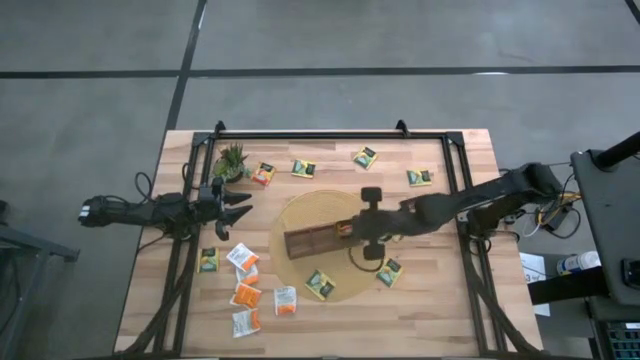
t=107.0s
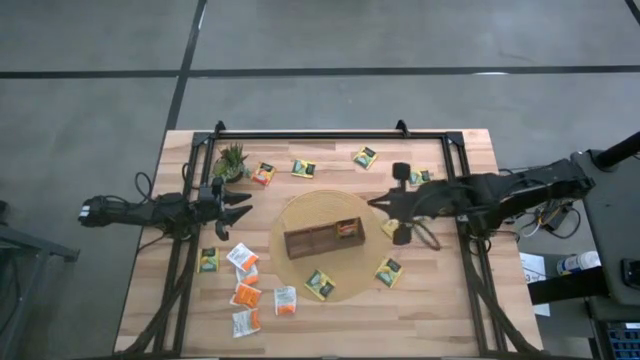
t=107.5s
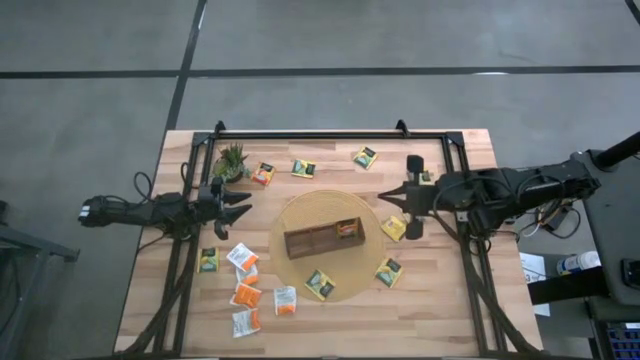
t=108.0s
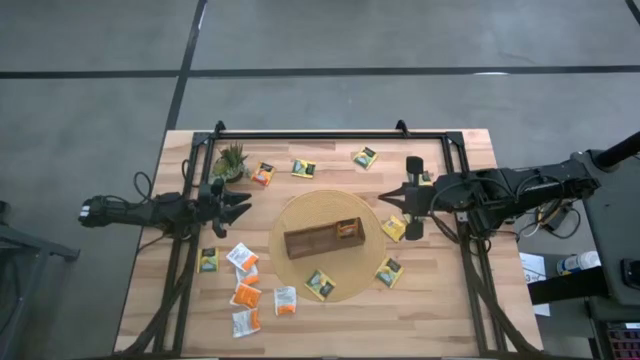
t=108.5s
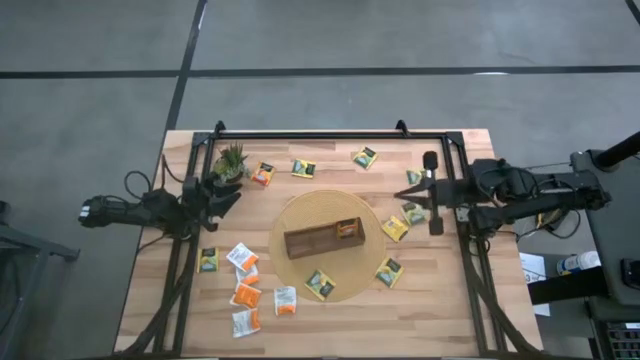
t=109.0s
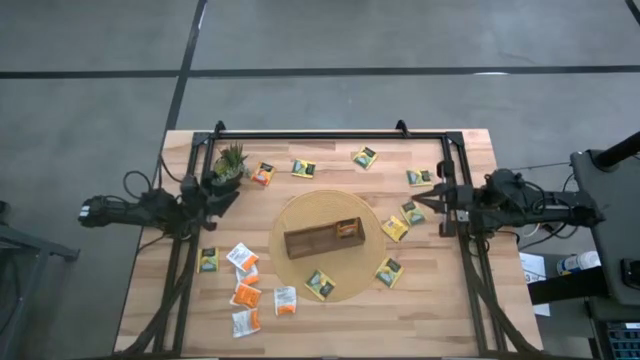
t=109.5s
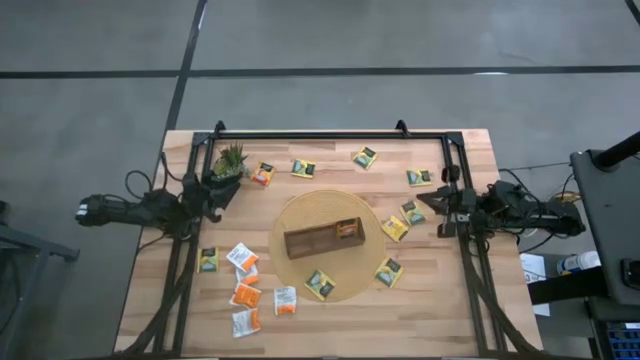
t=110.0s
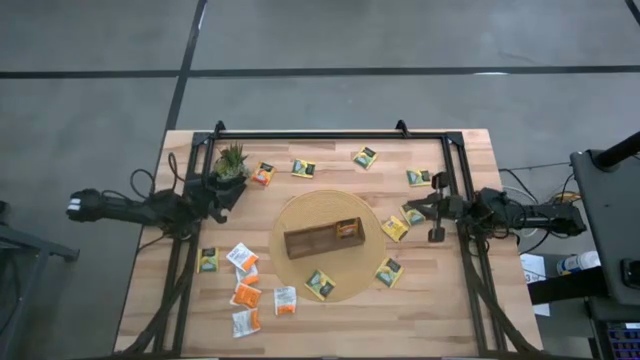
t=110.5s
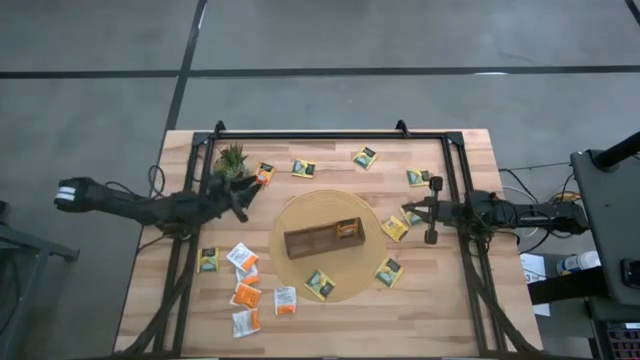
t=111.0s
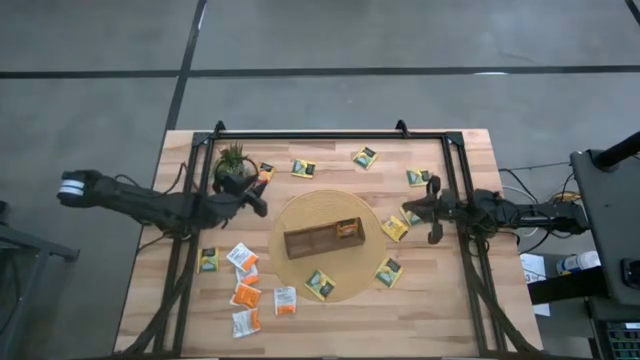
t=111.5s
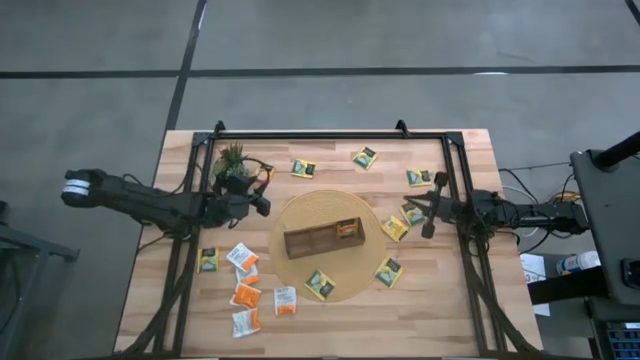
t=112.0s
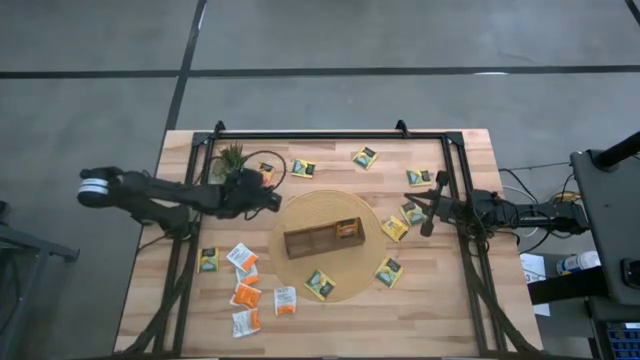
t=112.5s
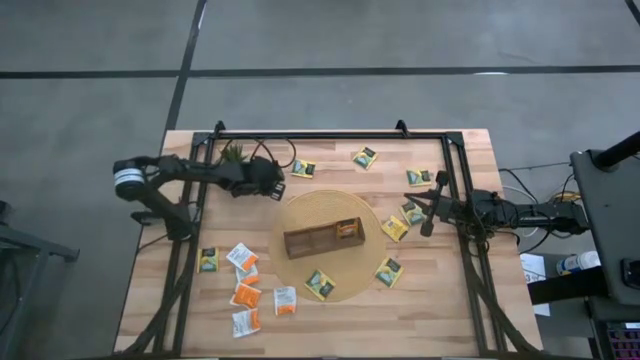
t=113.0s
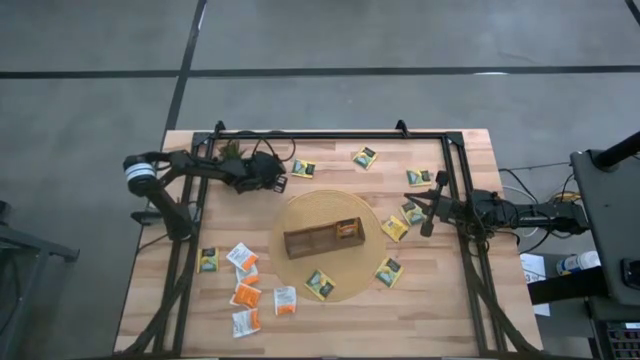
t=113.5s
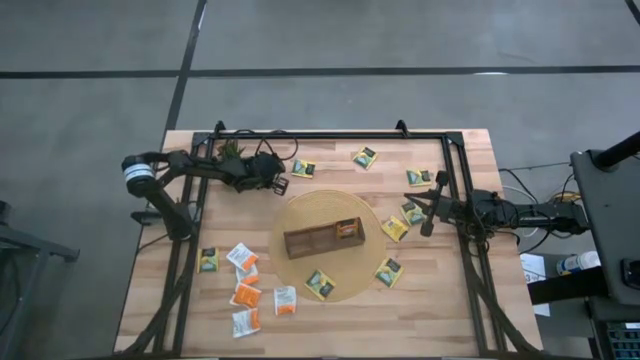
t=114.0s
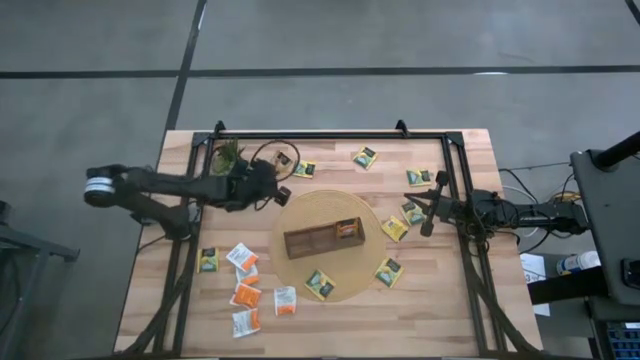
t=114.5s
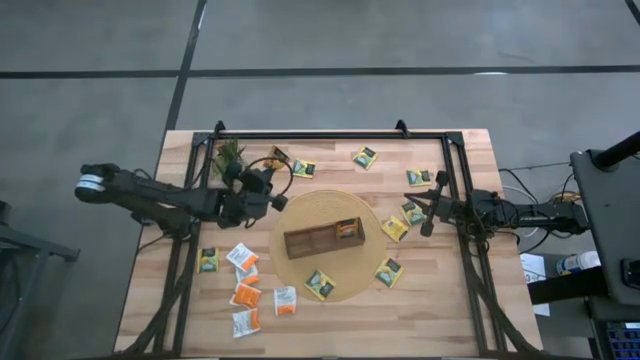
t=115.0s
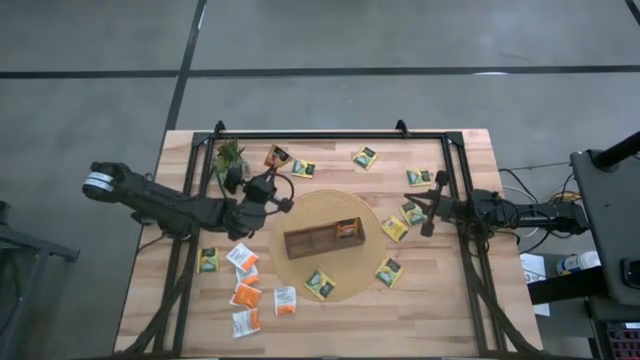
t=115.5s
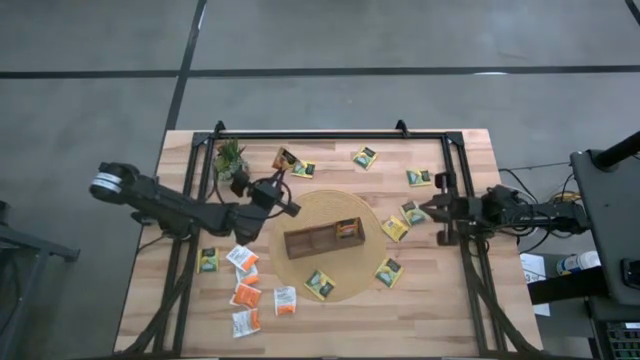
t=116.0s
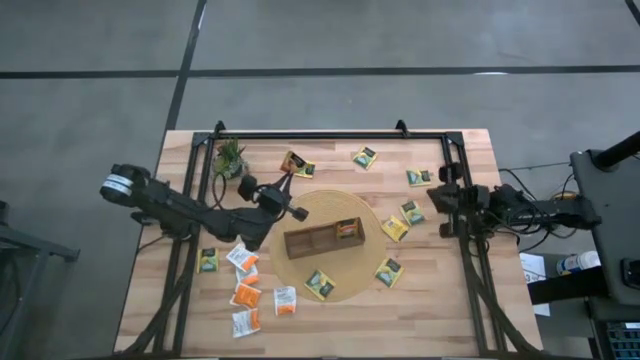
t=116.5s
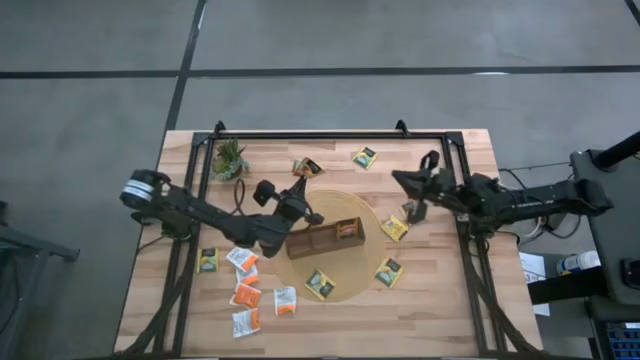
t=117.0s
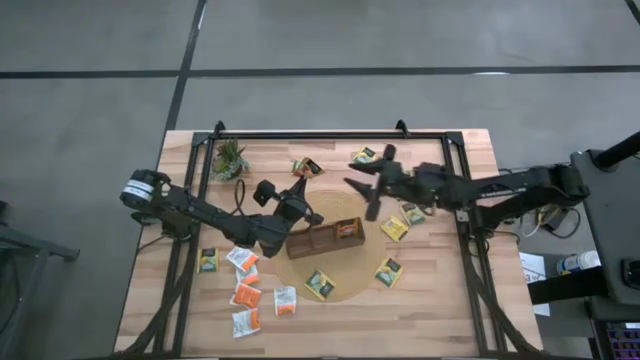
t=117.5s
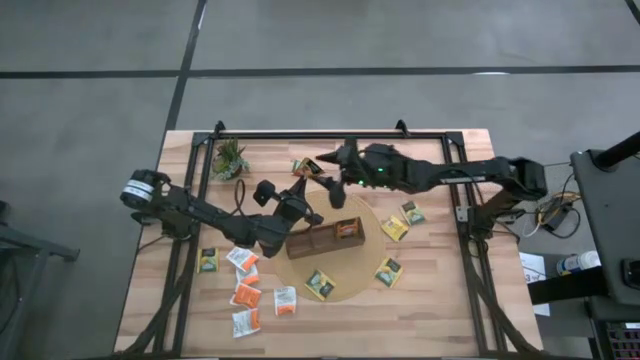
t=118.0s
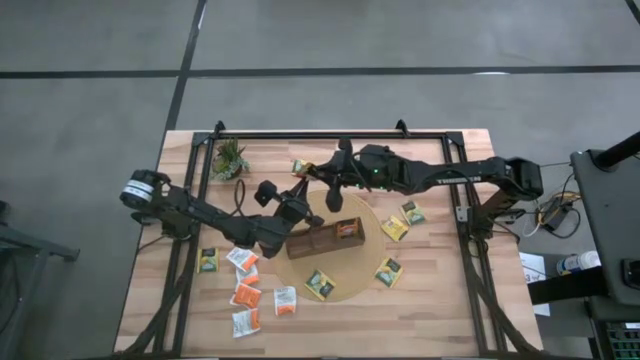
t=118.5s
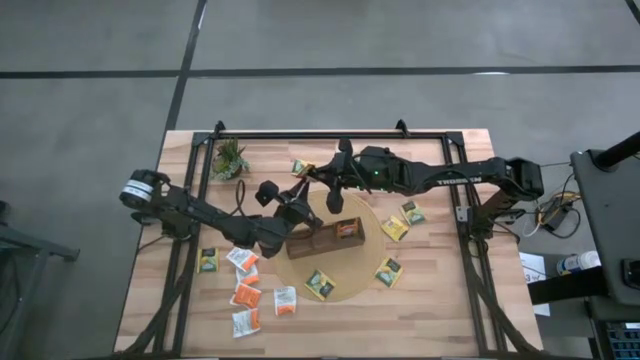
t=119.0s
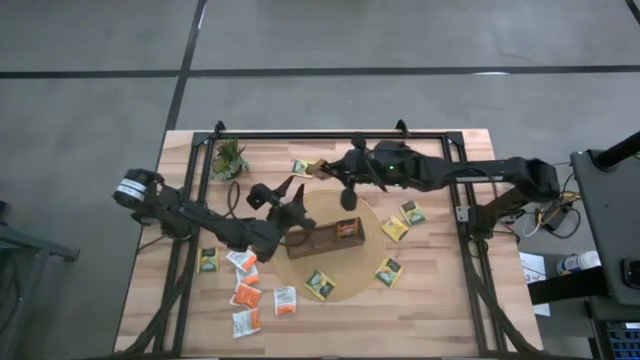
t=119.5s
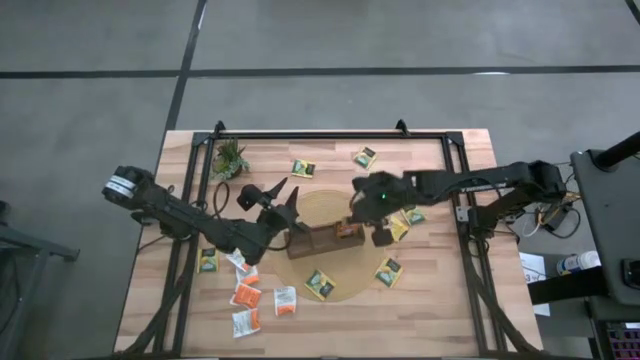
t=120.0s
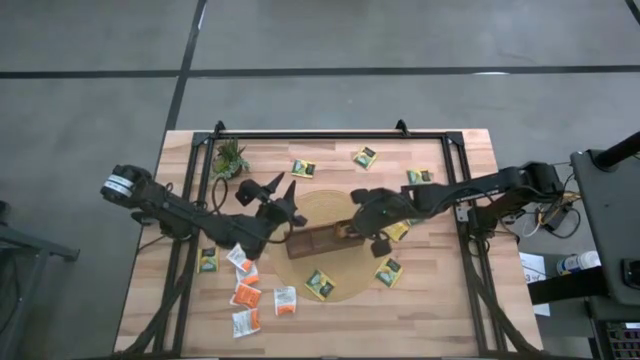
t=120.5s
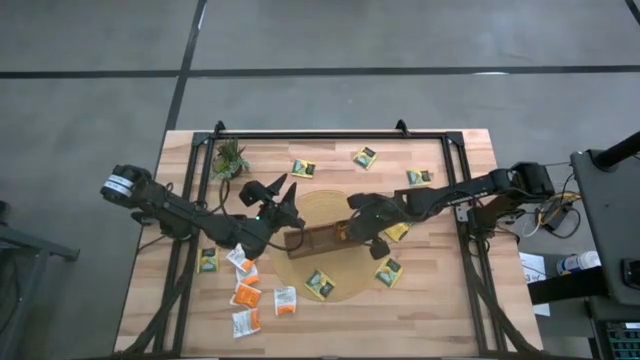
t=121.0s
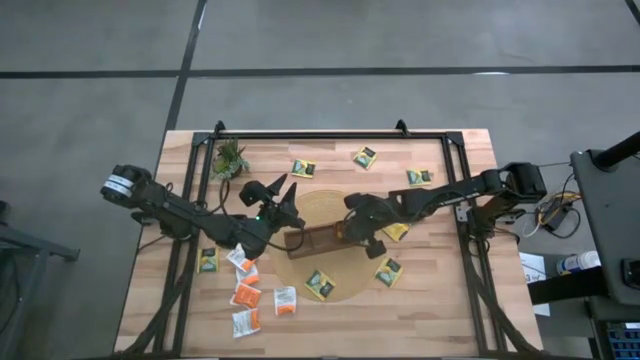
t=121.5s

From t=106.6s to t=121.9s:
Task: Pick & Place Tea
Put the orange tea bag into the right section of the wooden organizer

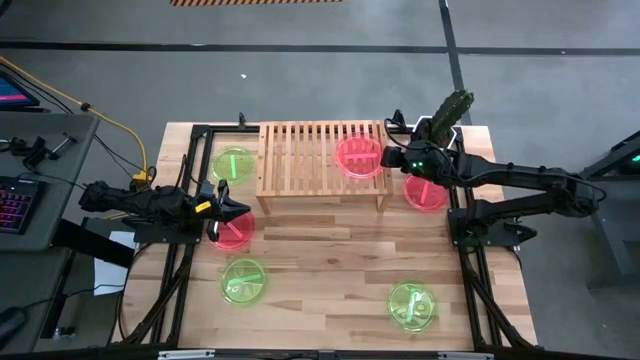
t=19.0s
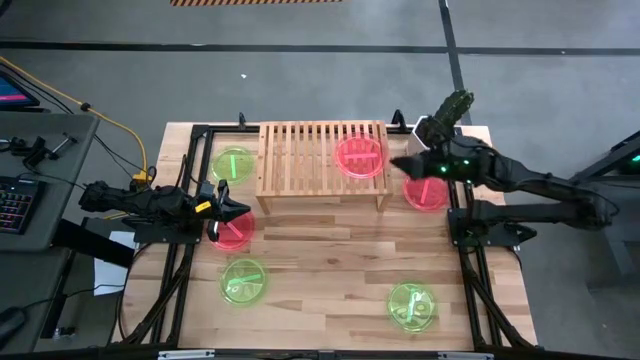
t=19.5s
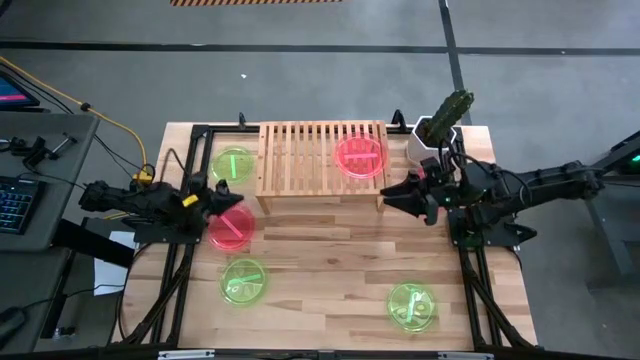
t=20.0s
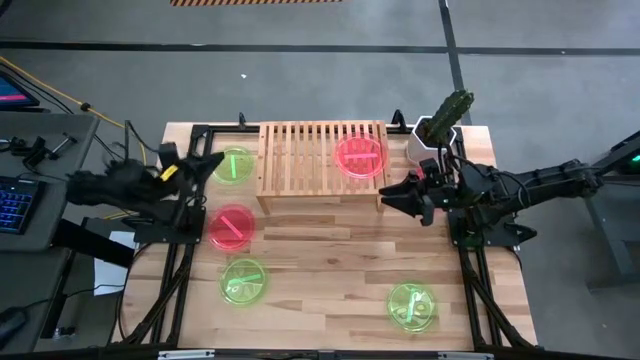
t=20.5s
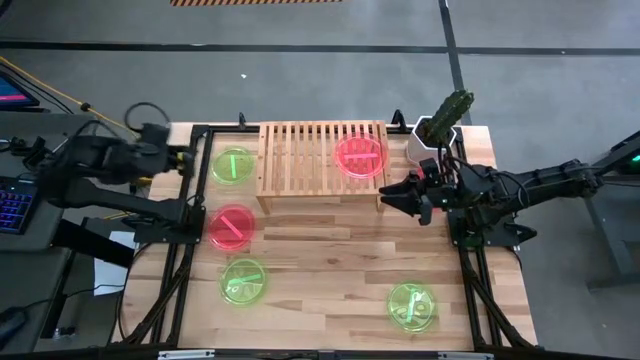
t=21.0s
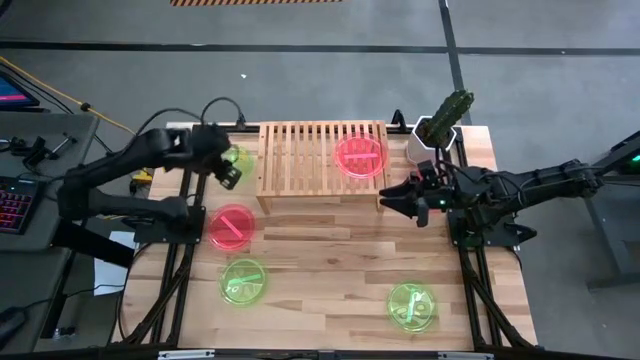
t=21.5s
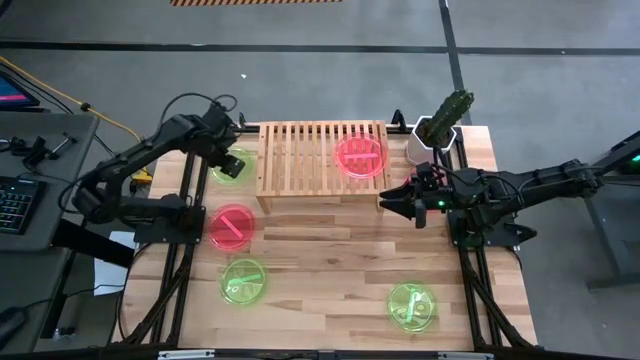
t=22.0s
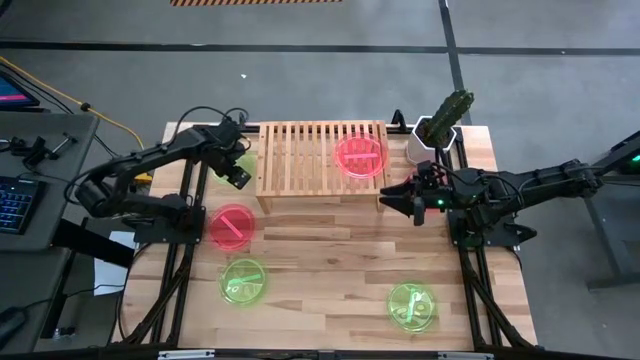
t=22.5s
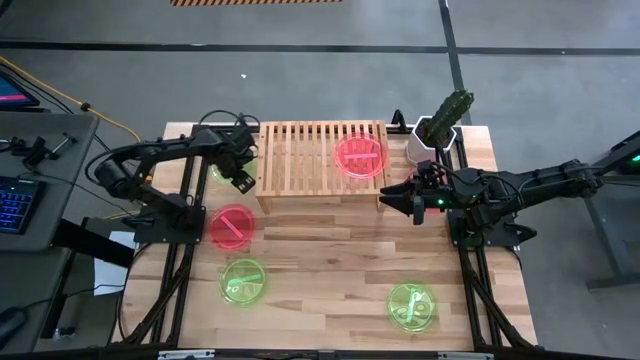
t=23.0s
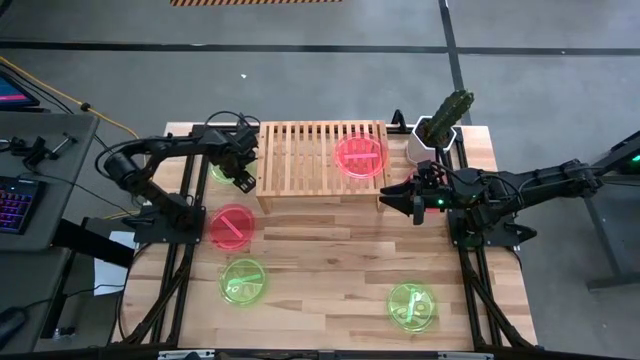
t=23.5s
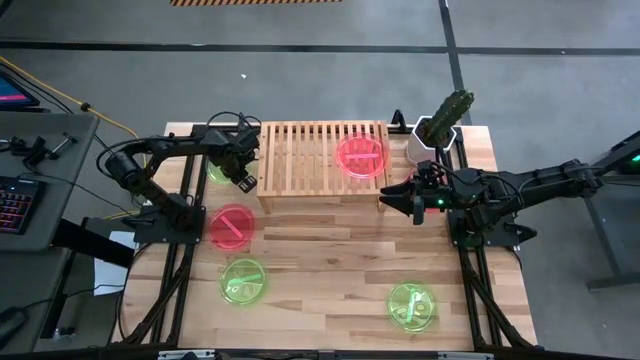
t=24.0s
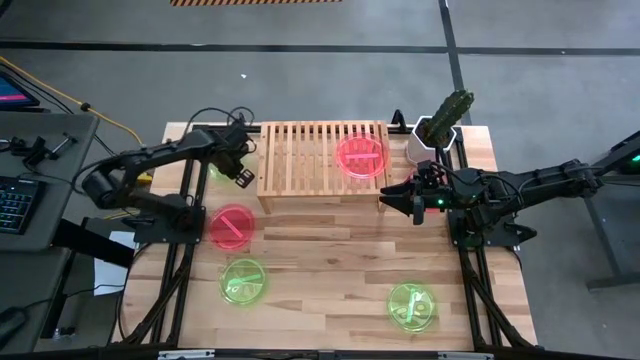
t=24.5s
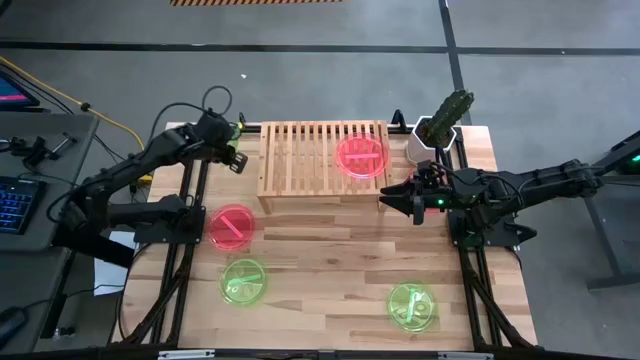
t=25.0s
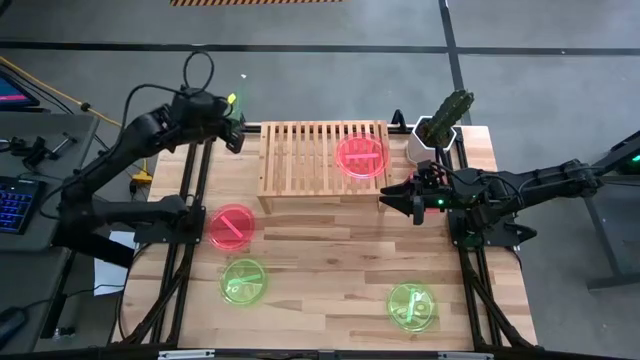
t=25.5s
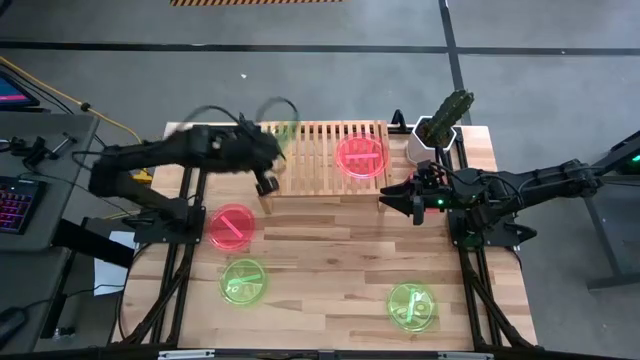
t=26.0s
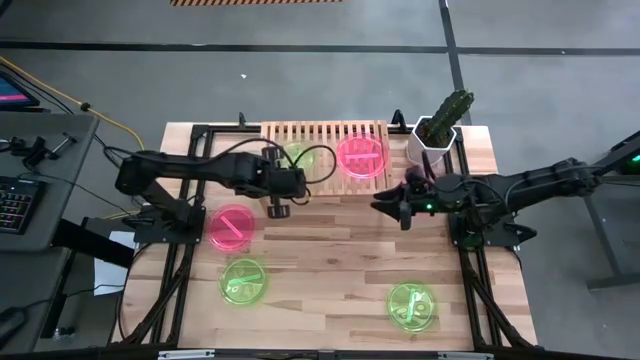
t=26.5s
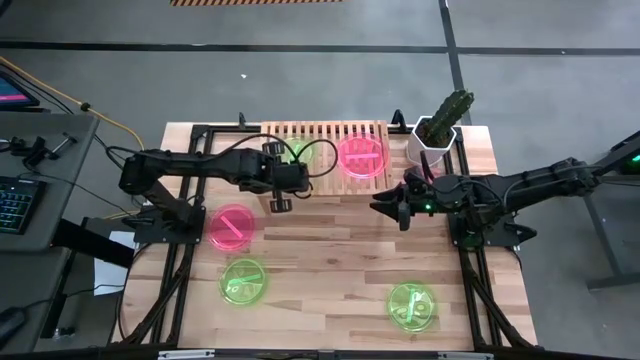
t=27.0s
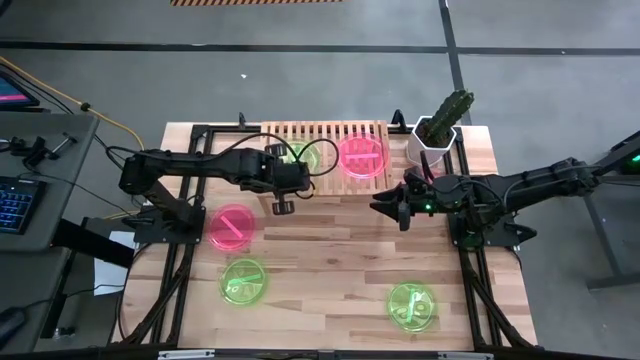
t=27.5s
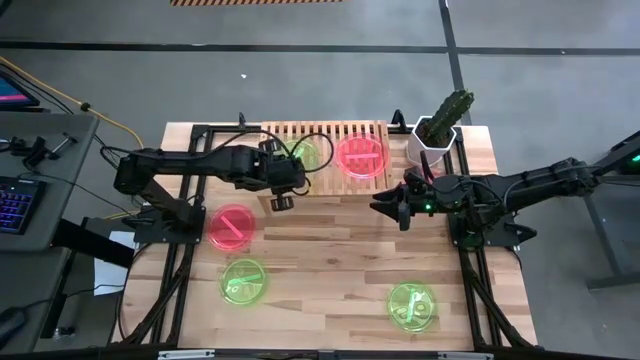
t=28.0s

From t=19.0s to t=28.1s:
Task: Place and stack plates onto a shelf
Put the top green transparent plate on the shelf
